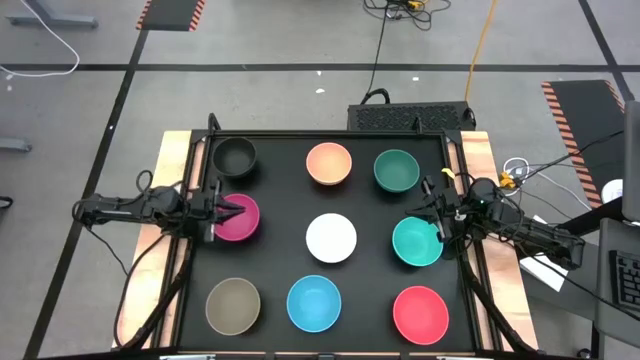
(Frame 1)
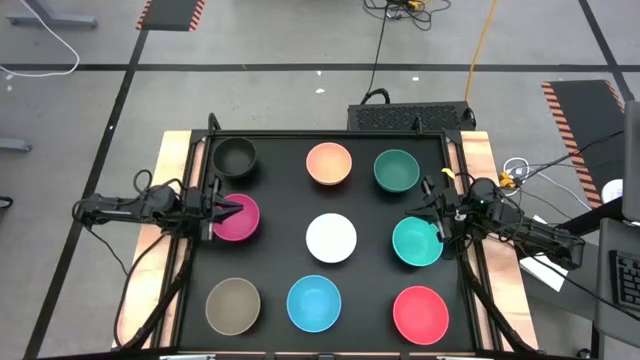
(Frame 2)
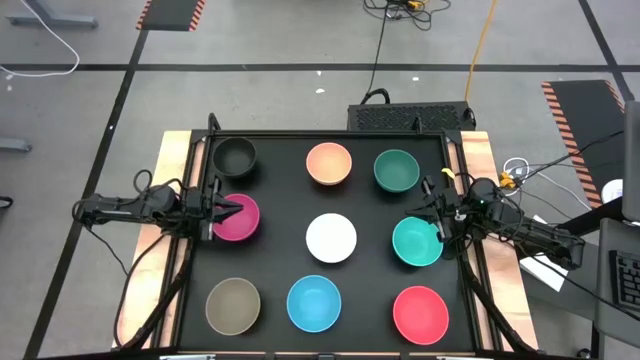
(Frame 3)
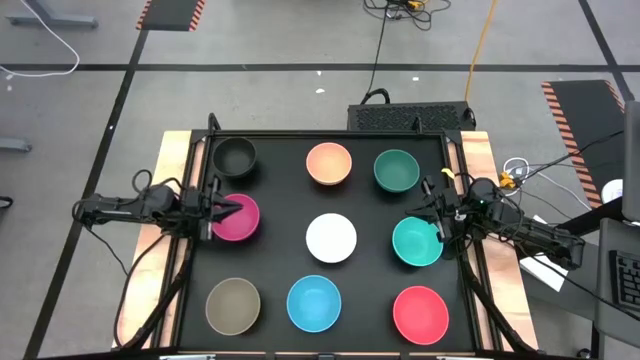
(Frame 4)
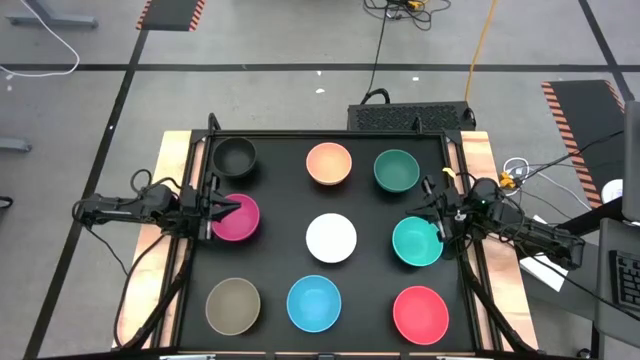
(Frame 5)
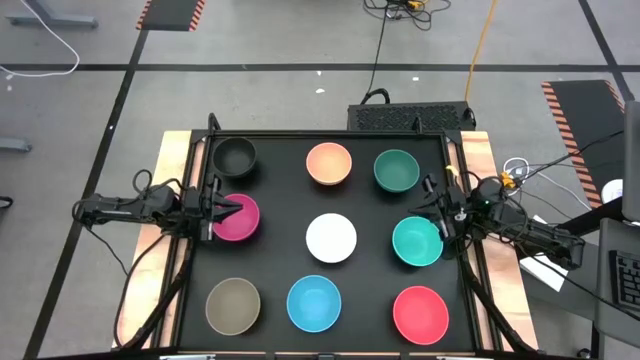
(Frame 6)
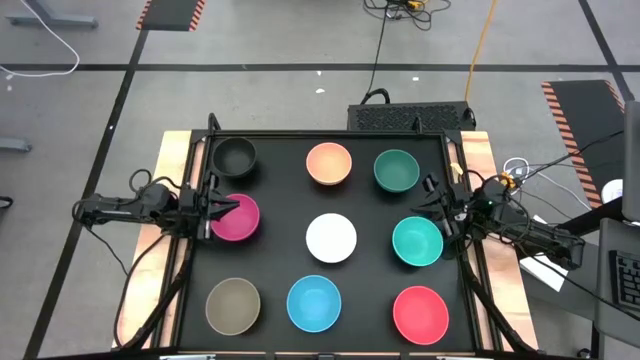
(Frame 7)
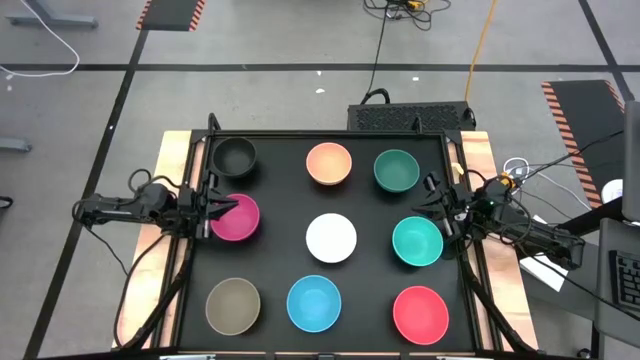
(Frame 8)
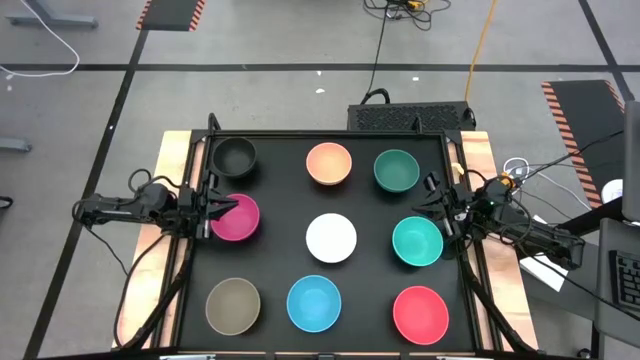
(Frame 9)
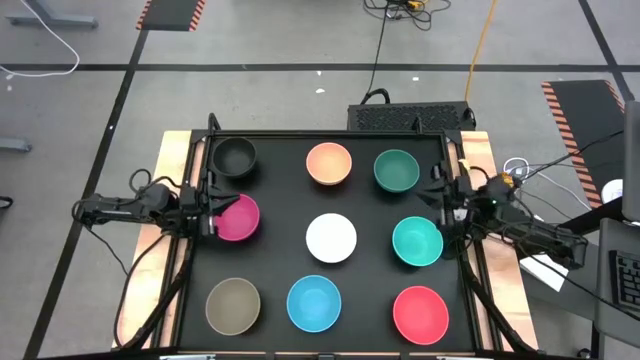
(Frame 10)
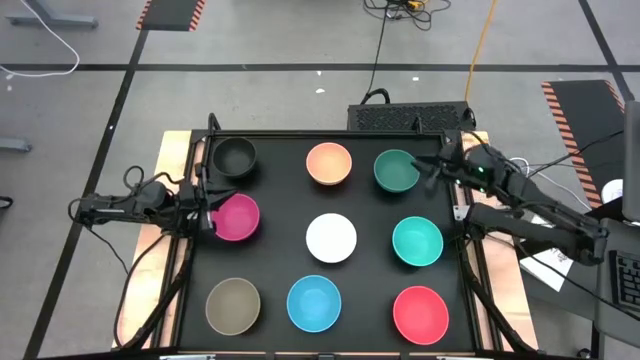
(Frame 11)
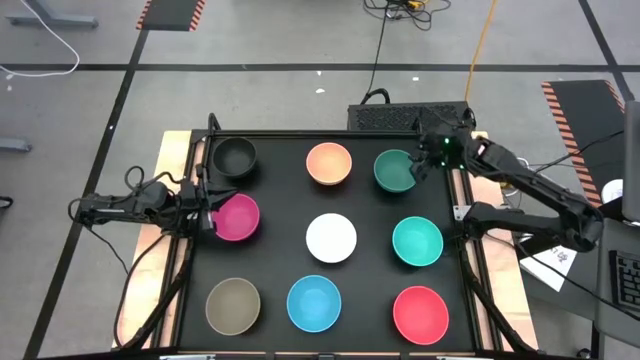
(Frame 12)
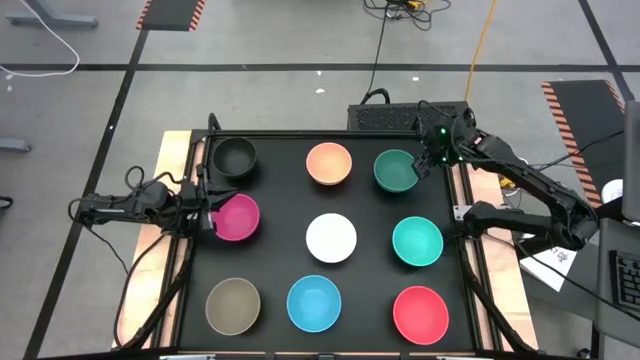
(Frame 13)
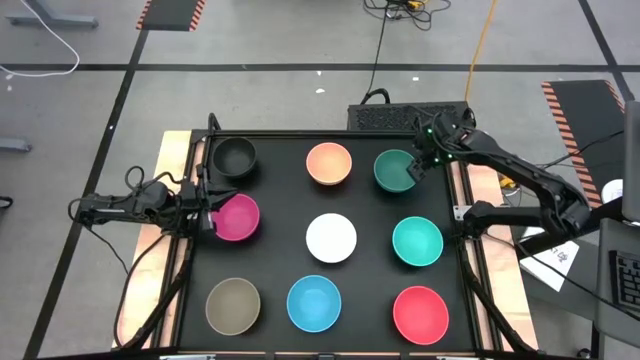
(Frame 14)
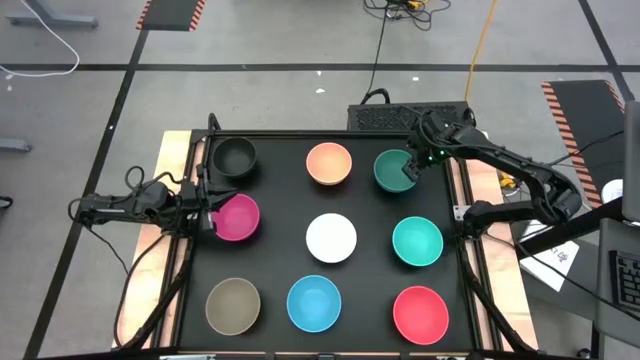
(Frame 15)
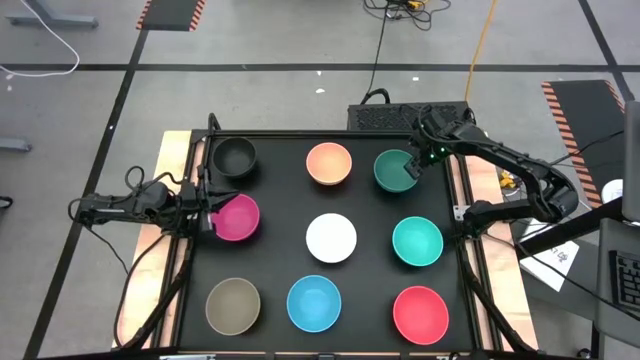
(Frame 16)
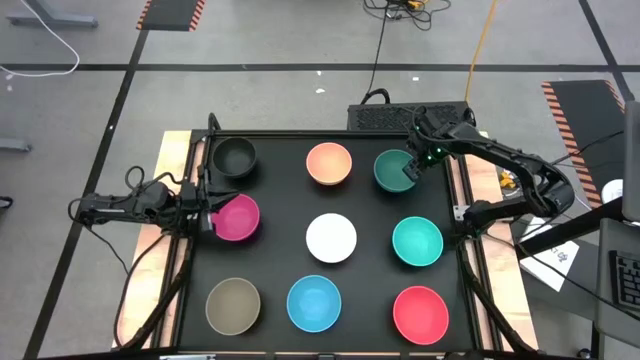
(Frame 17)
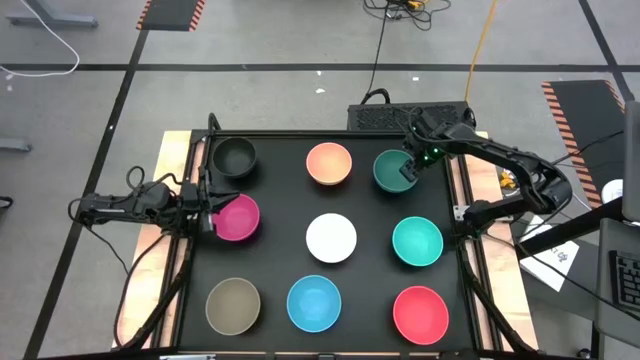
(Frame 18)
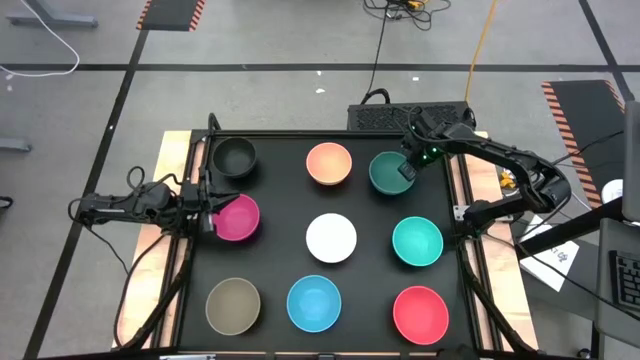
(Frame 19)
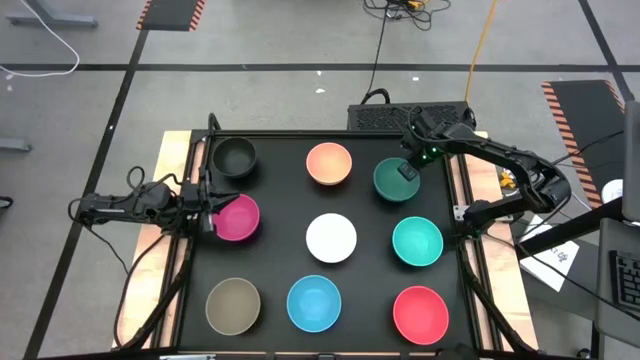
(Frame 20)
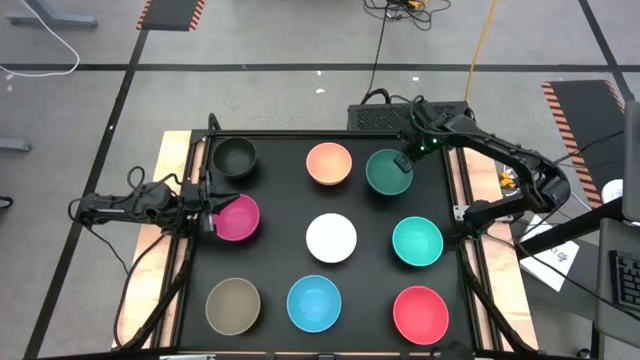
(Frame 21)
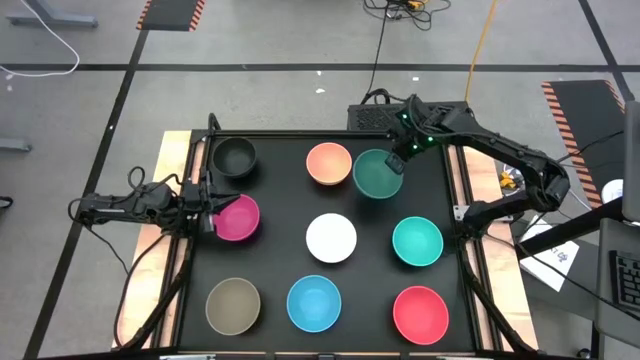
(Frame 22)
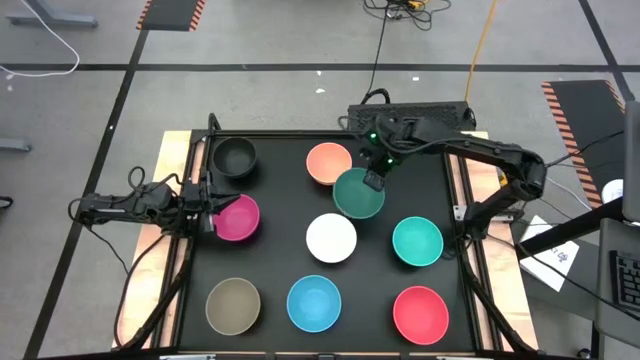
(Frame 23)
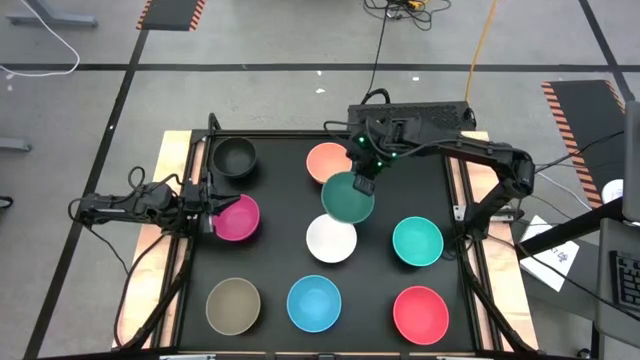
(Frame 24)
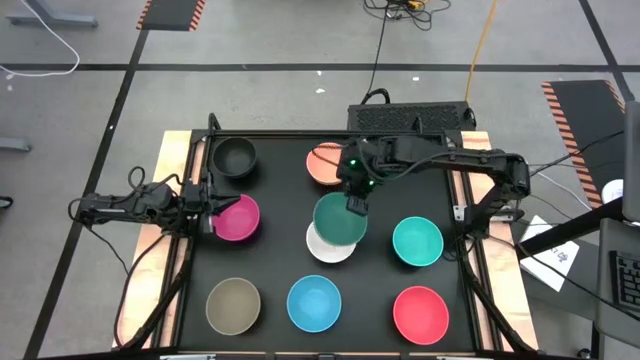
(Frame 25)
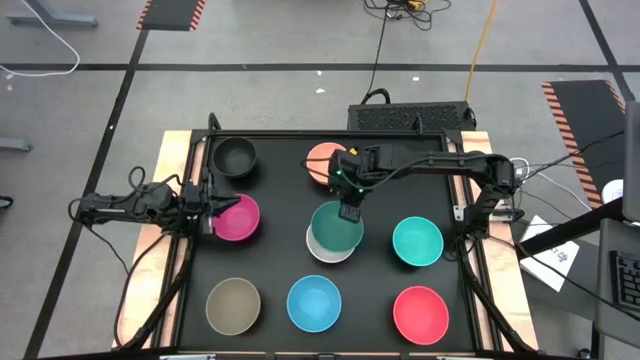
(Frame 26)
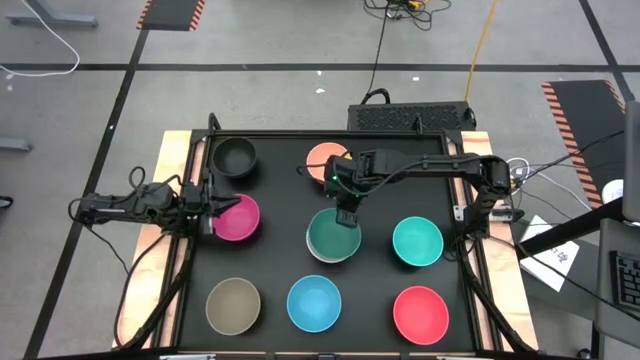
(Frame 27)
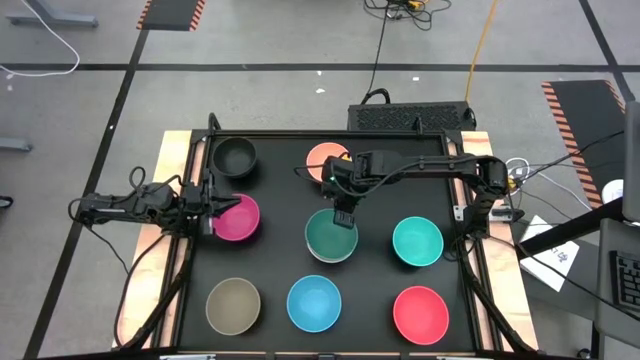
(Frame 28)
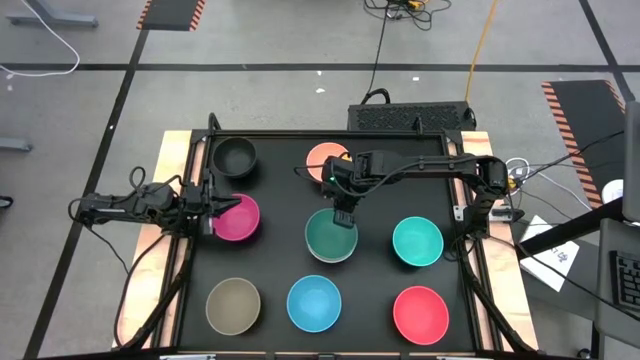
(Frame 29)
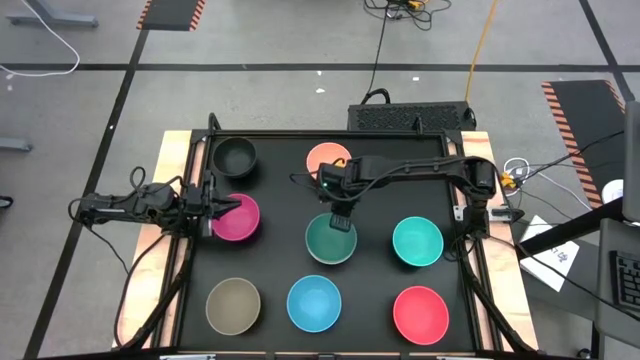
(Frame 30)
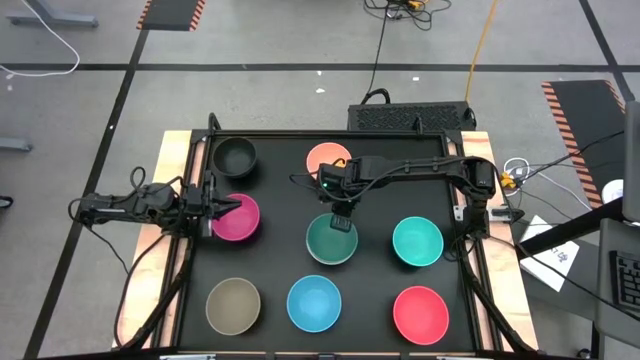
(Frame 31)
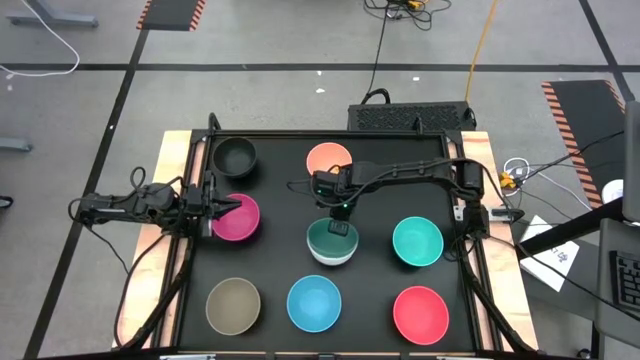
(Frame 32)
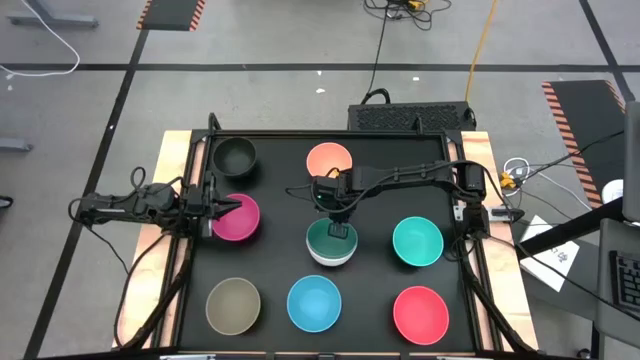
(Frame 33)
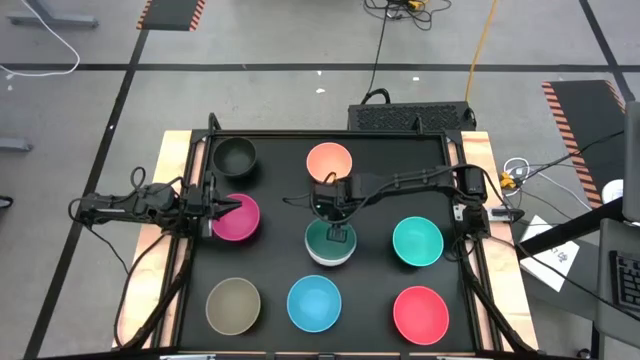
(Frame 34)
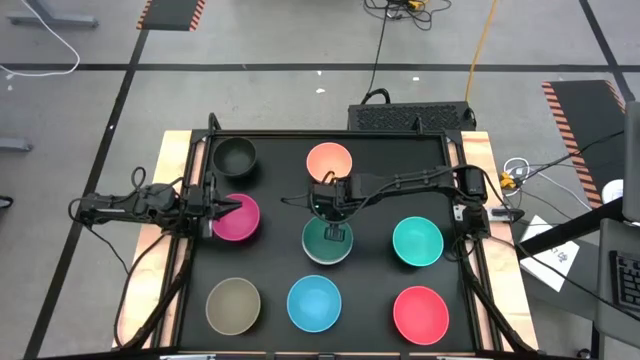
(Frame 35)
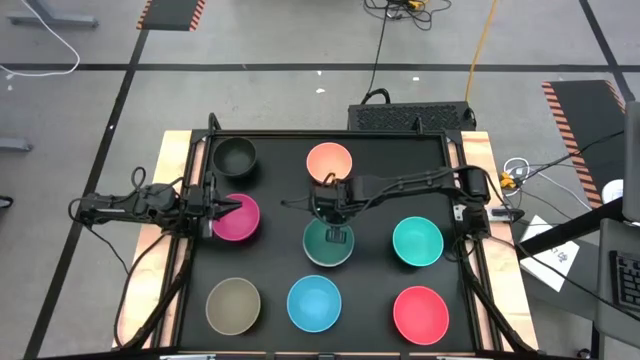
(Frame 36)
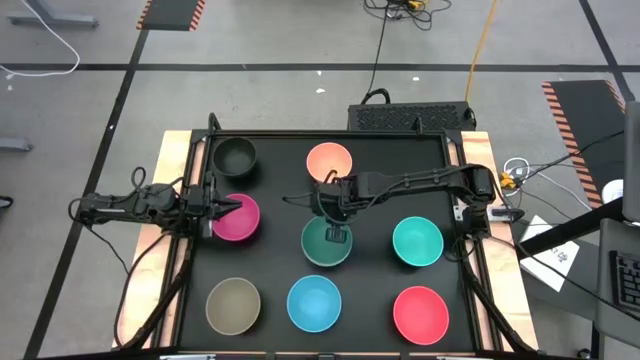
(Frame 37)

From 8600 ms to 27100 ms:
Task: Nest bowls inside each other
Stack the green bowl on the white bowl

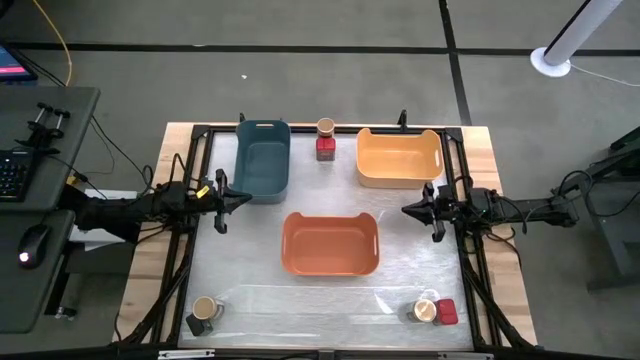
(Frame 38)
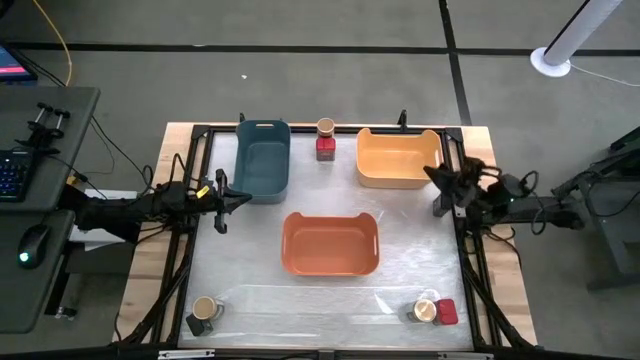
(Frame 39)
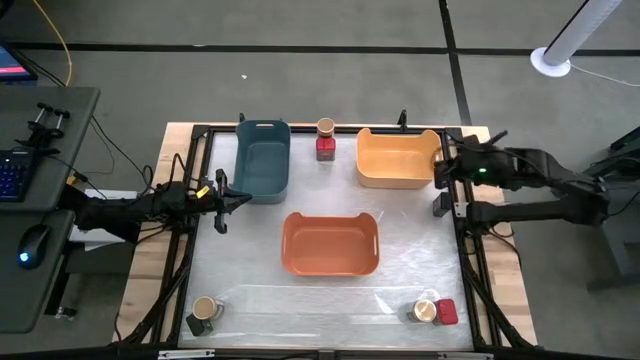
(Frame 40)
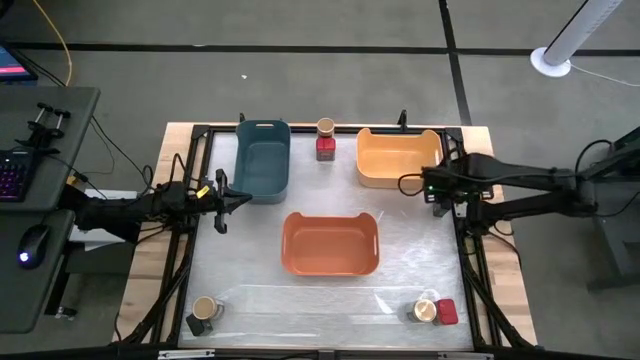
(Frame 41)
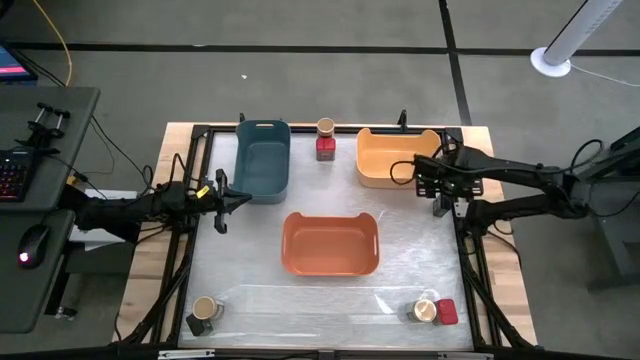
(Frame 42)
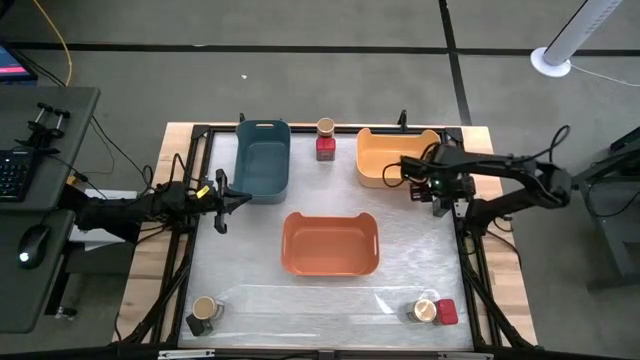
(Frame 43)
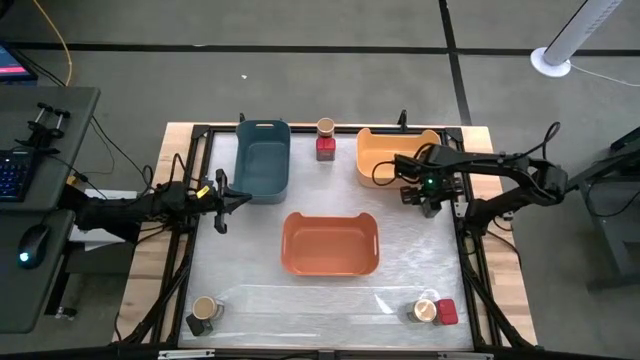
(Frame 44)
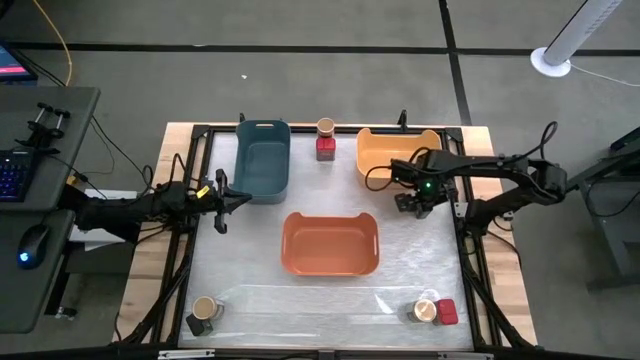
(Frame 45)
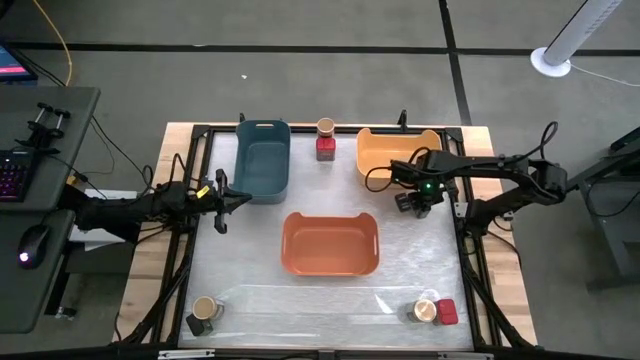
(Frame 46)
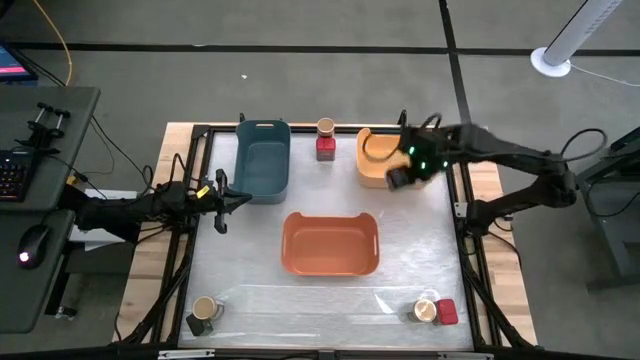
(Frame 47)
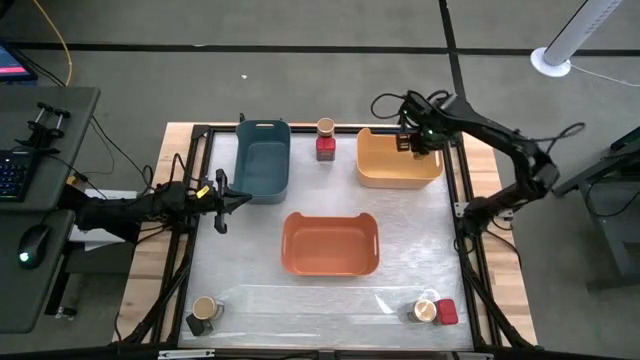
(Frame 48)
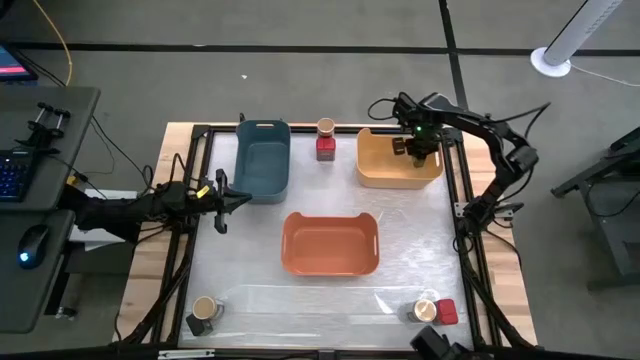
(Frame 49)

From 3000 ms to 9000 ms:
Task: Sort spices by type
Put the top black seasoning can into the yellow bin
